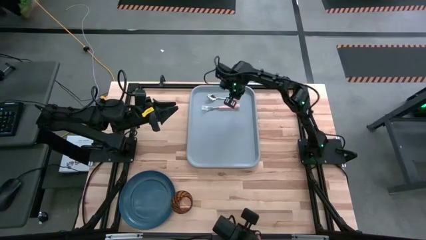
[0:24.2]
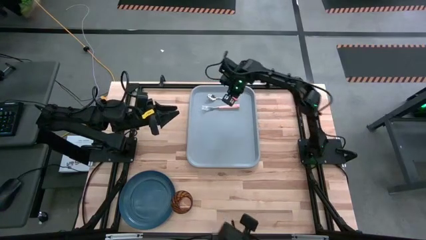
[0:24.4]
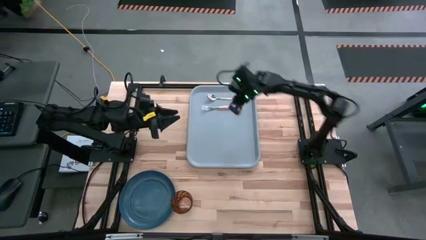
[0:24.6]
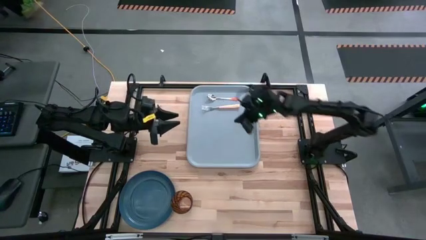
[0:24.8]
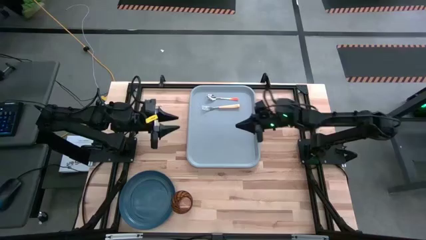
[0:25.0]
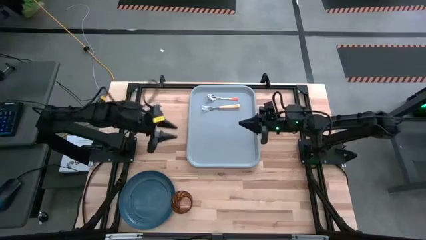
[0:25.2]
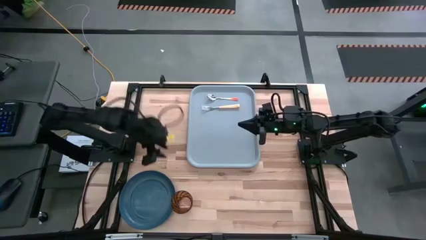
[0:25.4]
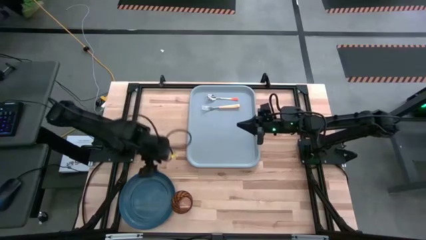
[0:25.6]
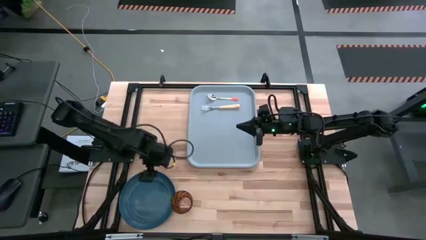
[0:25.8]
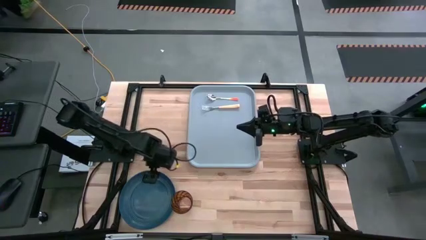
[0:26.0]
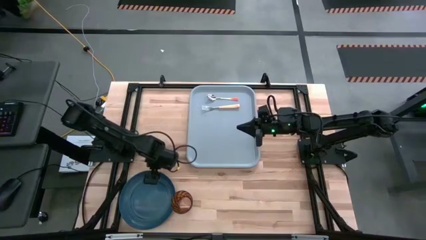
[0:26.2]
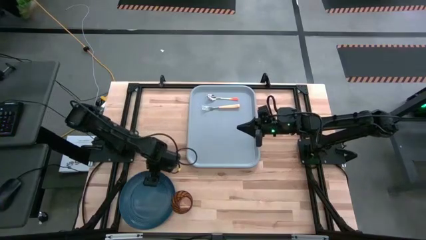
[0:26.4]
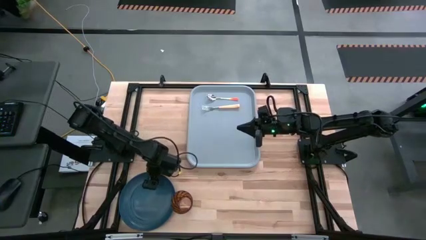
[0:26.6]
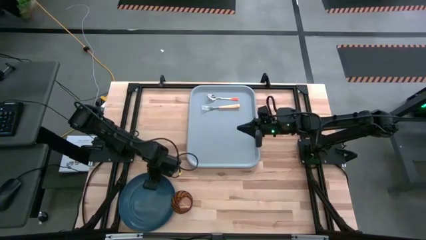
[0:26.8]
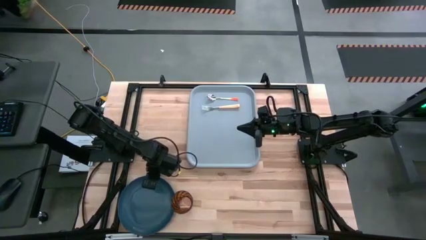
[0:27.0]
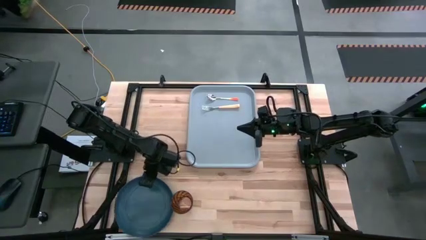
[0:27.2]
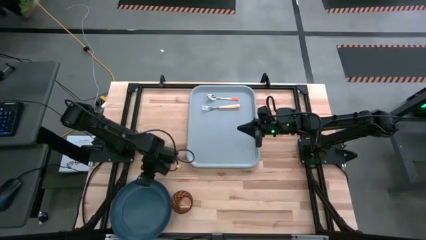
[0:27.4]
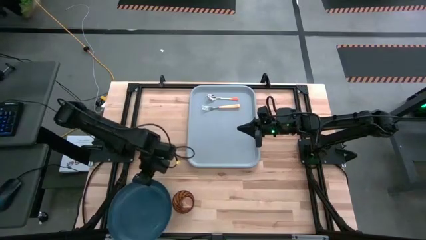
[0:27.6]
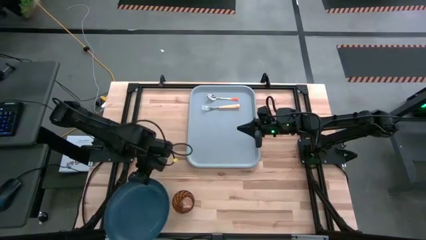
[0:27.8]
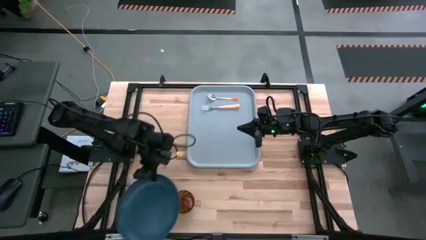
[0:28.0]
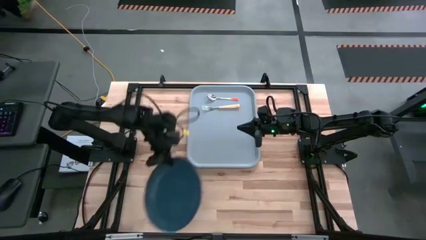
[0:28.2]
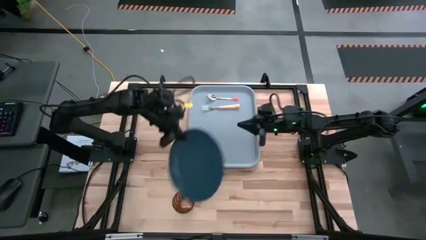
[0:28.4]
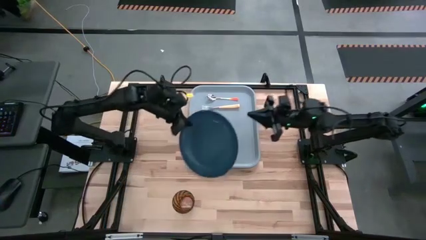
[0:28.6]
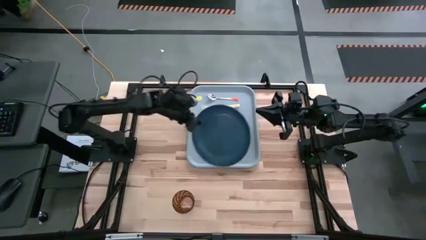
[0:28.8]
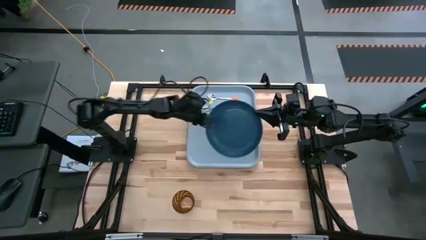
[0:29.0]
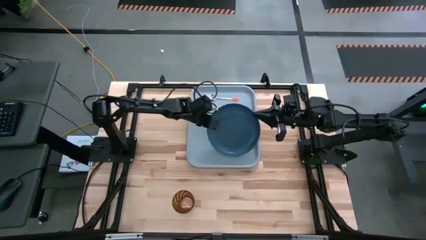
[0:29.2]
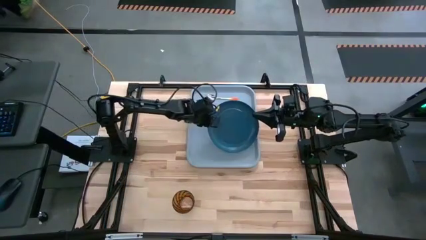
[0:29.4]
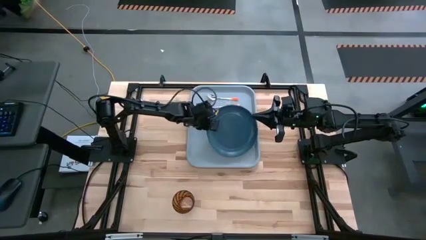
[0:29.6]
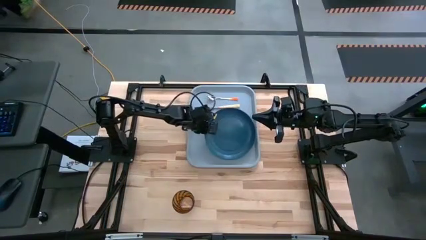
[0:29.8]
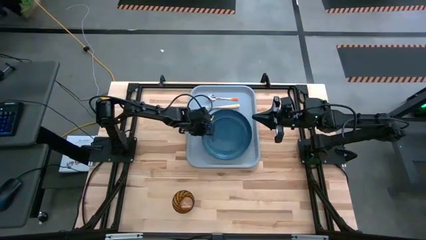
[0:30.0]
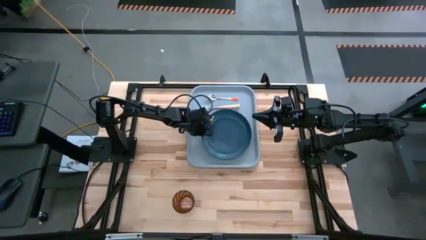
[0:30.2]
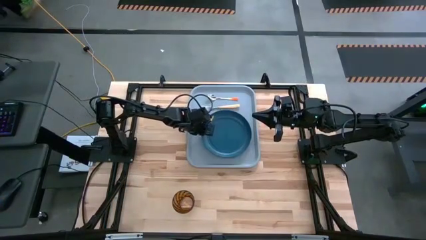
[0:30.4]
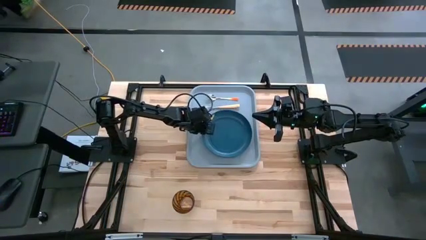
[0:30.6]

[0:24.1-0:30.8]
Task: Pick and place plate/cup/fork/spoon on tray
Put the blue plate to the left of the orange fork on the blue serving tray

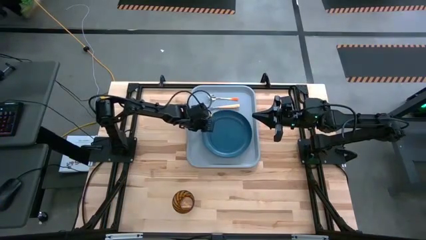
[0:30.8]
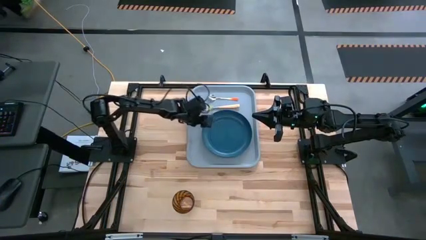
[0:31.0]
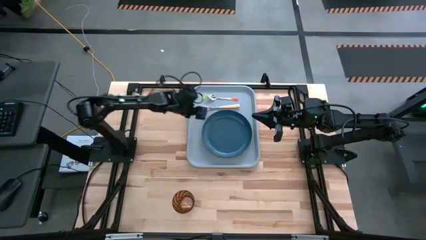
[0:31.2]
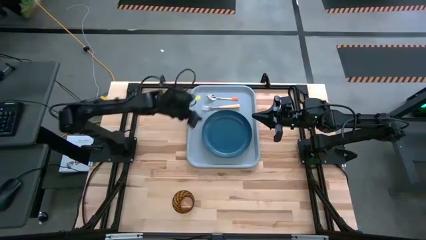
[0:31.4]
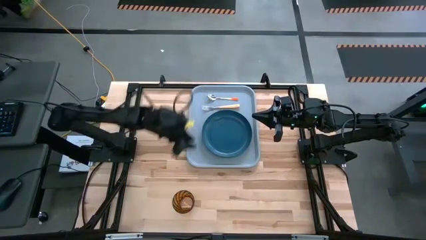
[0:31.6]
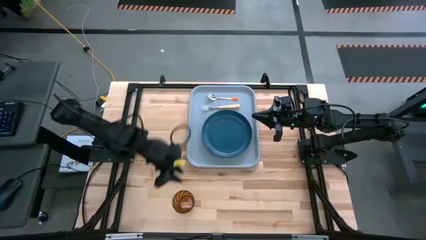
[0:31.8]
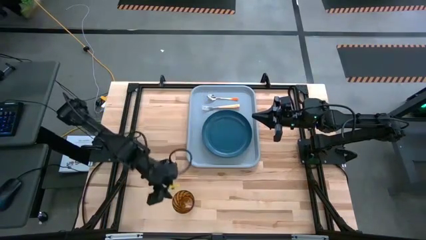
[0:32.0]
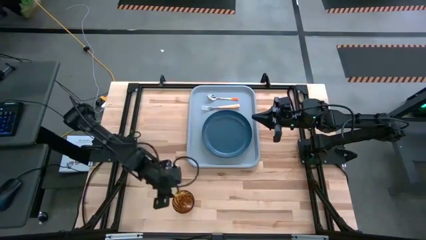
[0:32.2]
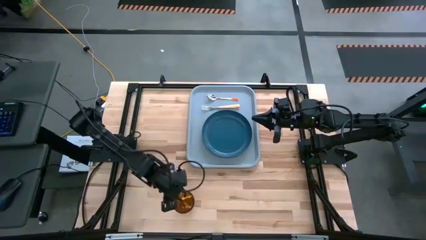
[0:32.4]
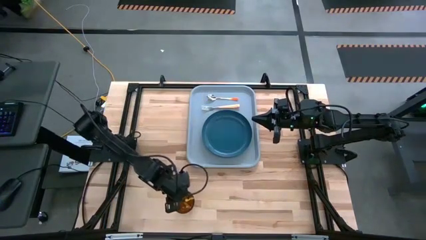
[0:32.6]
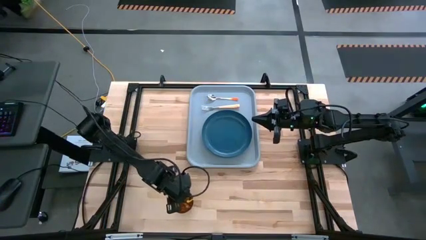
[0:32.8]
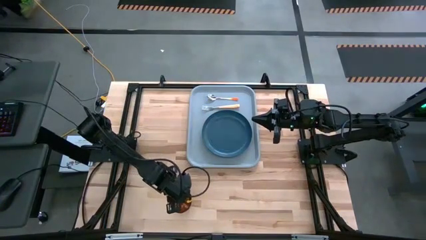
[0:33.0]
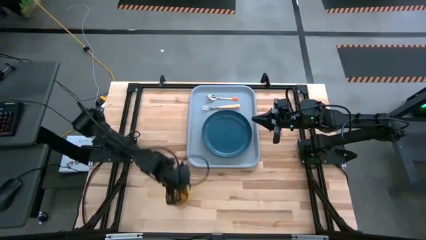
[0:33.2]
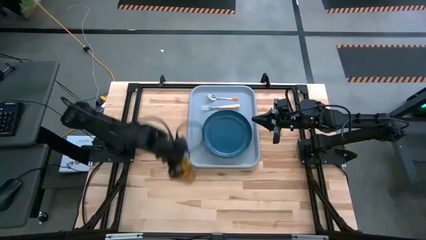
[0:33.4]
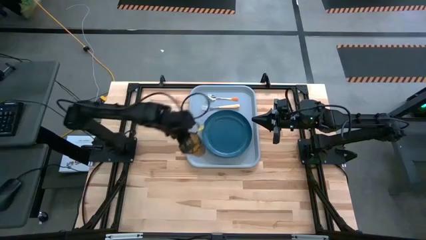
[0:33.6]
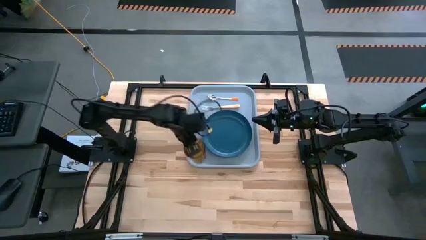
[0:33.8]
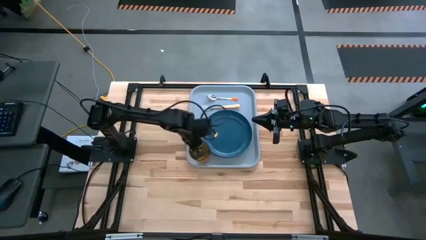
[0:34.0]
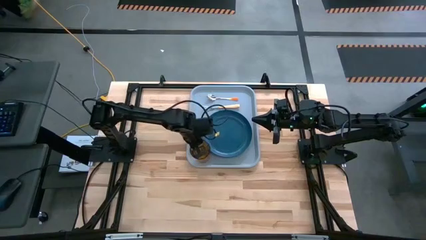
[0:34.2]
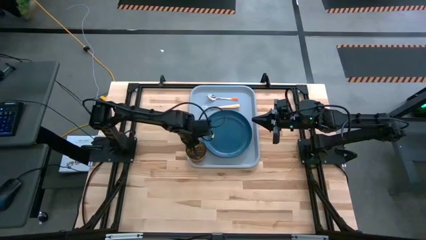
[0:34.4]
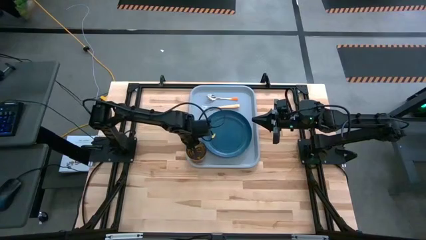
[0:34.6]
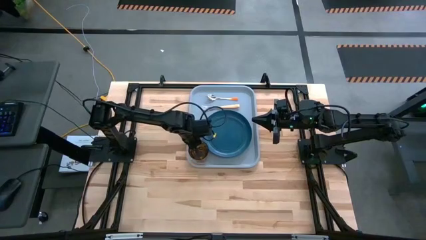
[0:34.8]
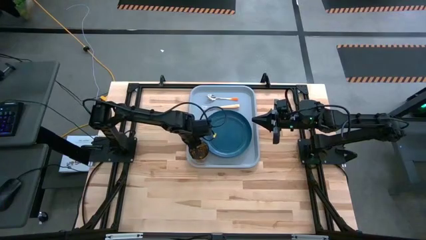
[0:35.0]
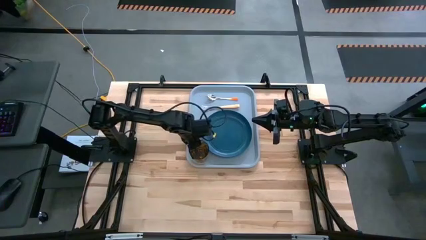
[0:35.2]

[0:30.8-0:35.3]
Put the brown cup to the top left of the blue plate on the blue serving tray

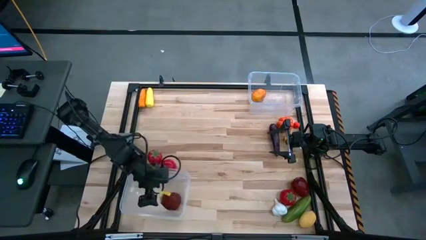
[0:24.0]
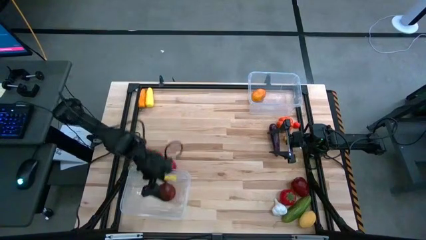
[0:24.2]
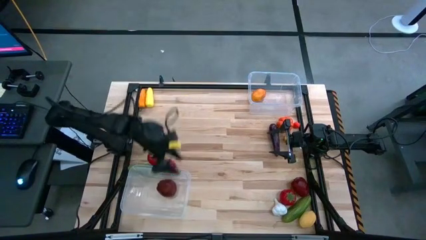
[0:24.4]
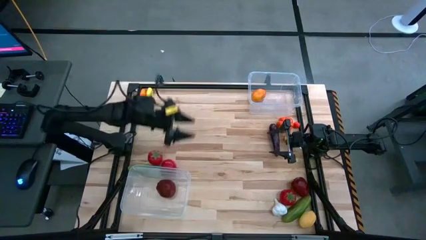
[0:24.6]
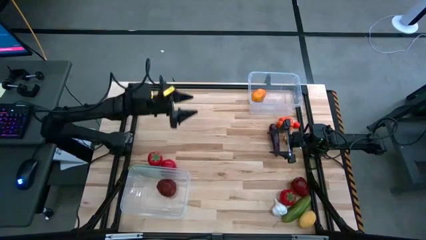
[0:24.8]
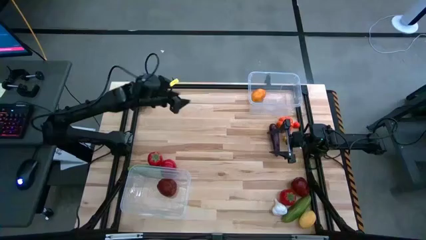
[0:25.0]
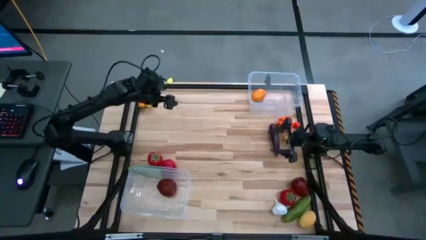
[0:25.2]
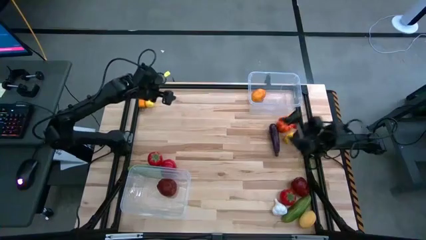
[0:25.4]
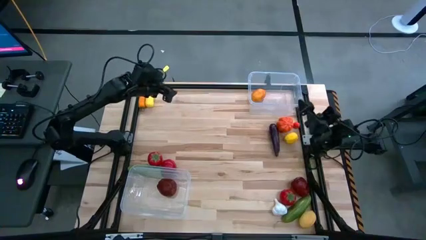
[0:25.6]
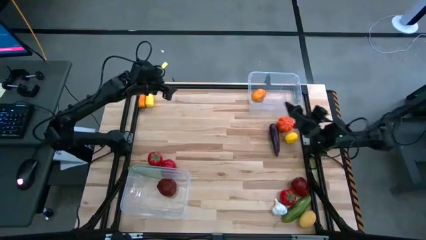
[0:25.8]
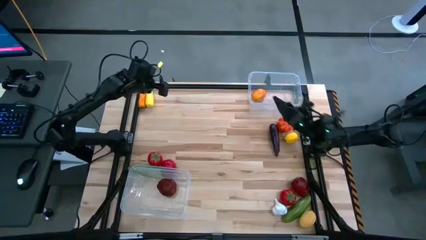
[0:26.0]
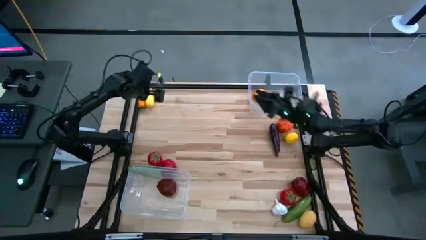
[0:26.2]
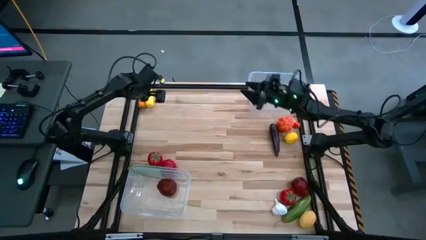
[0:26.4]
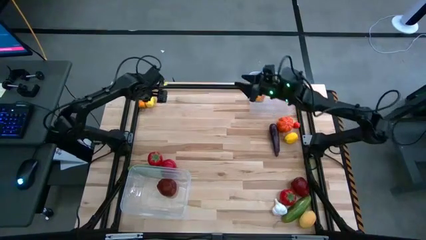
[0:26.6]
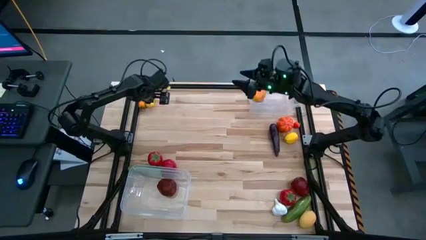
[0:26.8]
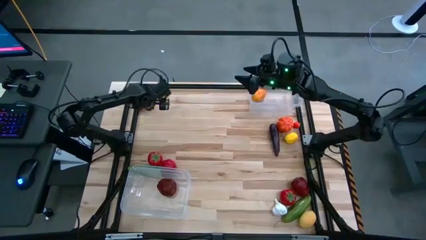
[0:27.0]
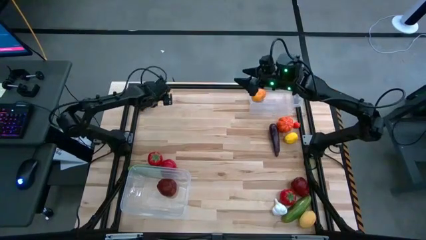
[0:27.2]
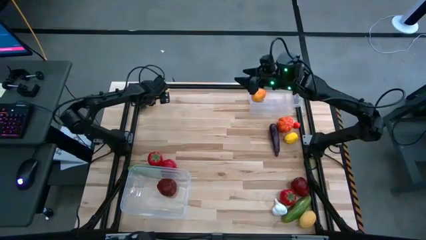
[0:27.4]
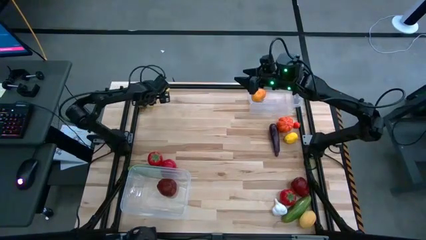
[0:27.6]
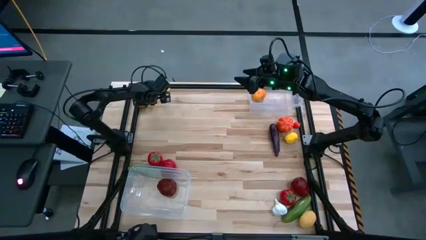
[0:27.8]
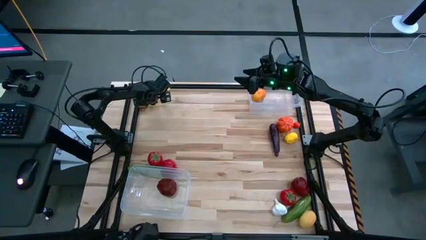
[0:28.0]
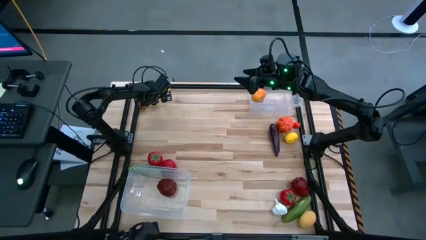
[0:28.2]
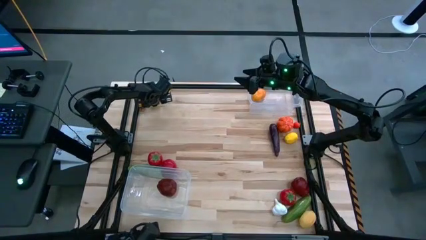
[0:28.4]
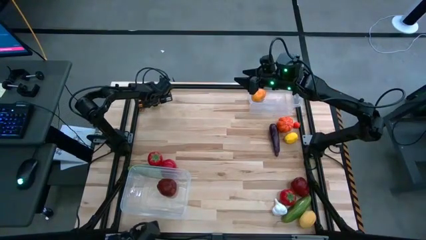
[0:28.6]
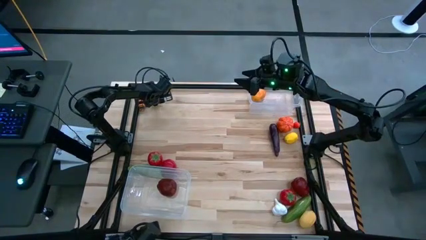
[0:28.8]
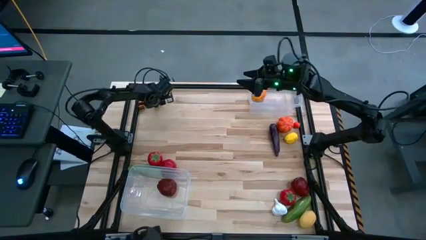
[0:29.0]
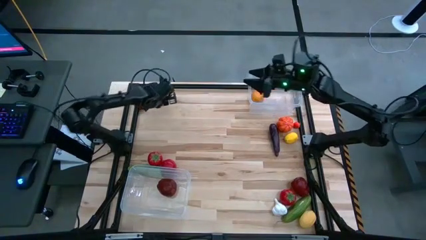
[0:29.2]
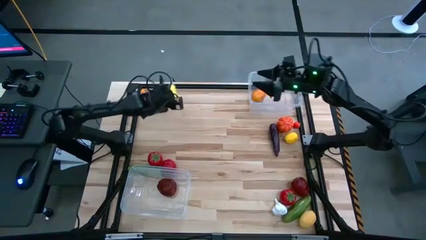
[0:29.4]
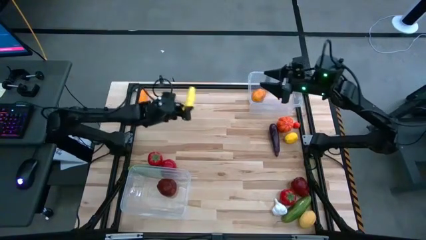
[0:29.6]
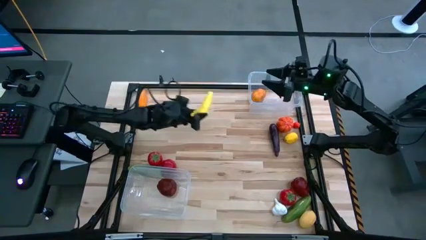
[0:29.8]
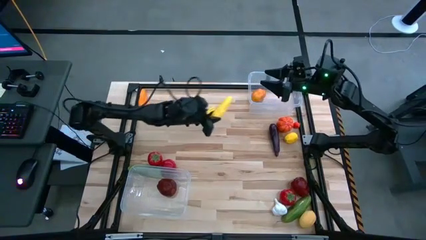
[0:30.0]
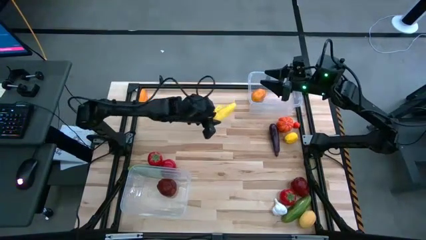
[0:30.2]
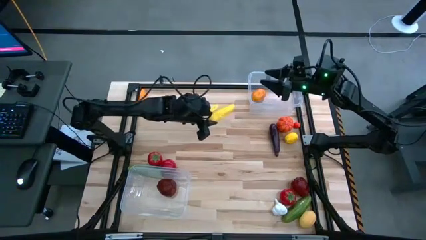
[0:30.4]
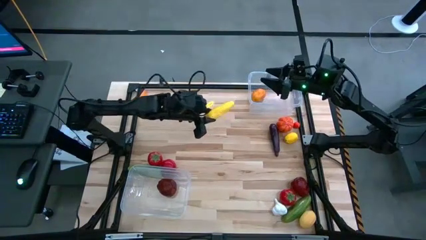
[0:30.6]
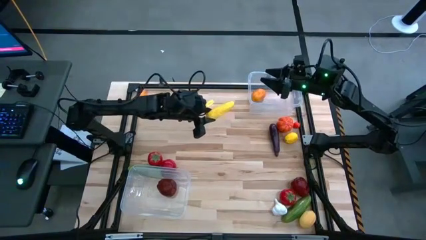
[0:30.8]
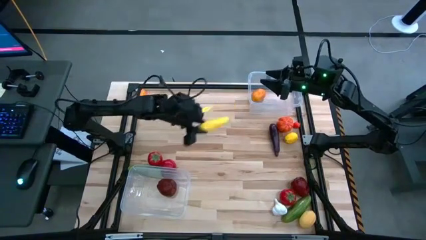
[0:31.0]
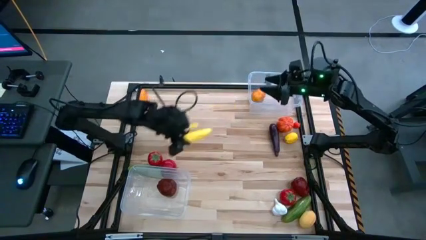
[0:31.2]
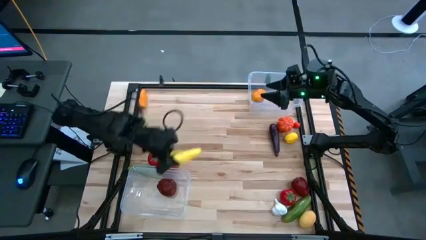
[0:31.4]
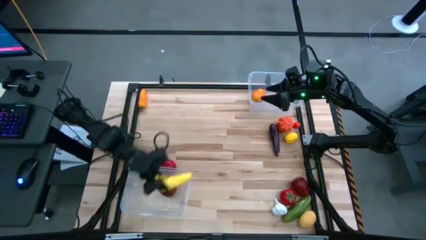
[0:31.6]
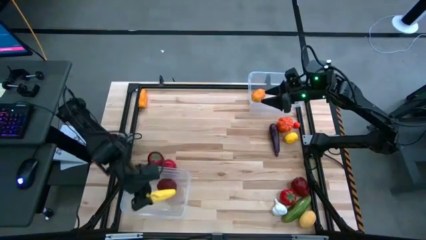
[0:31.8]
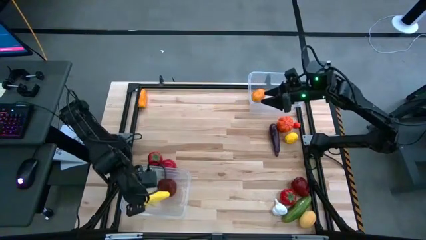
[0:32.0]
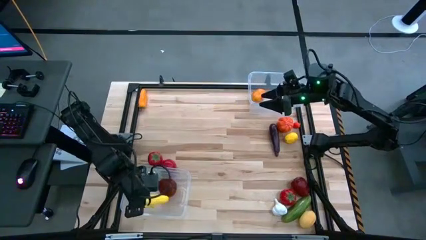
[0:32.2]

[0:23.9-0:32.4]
Task: Sort produce into baskets
Put the yellow corn into the bottom transparent bin
